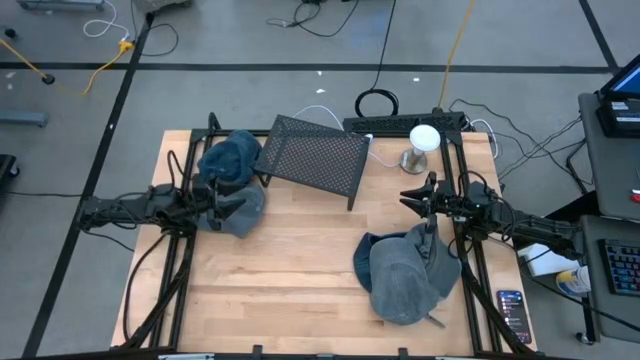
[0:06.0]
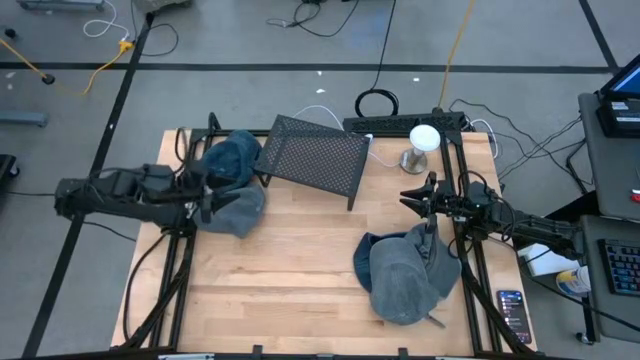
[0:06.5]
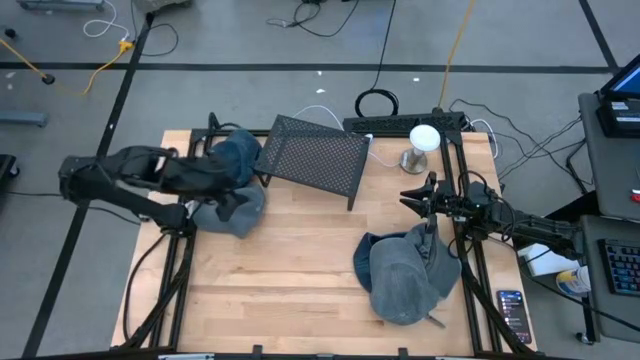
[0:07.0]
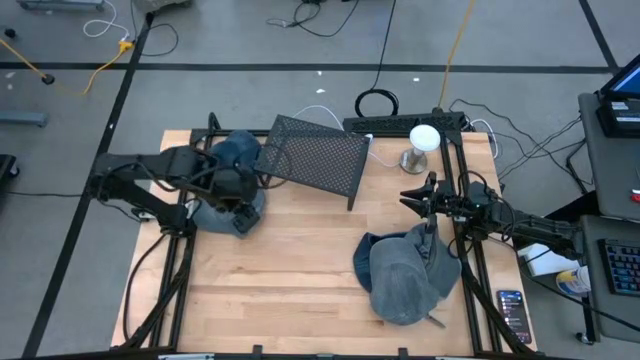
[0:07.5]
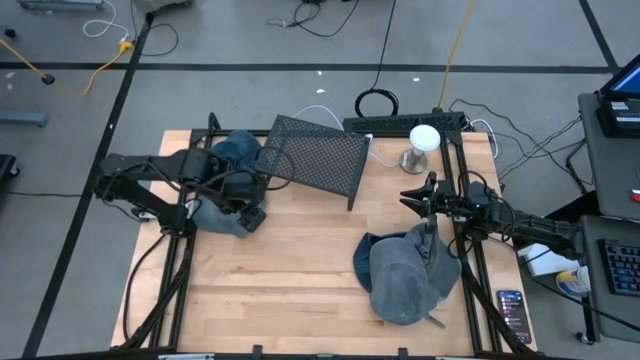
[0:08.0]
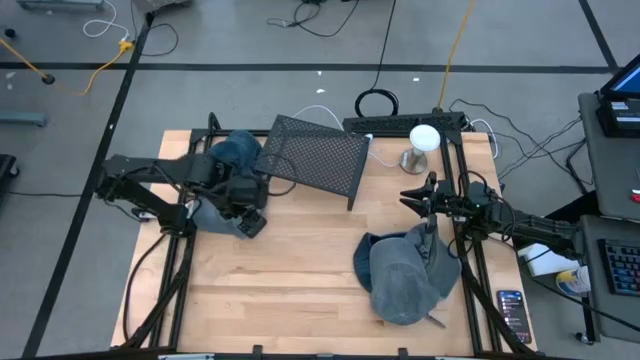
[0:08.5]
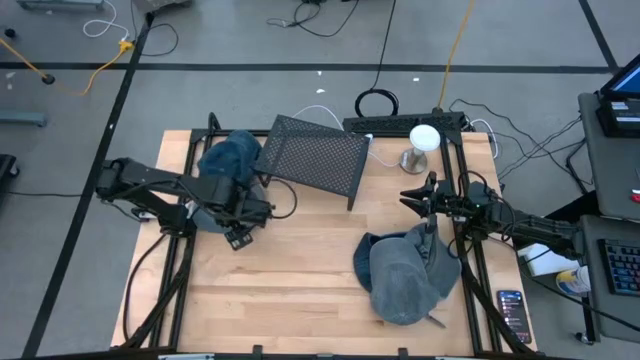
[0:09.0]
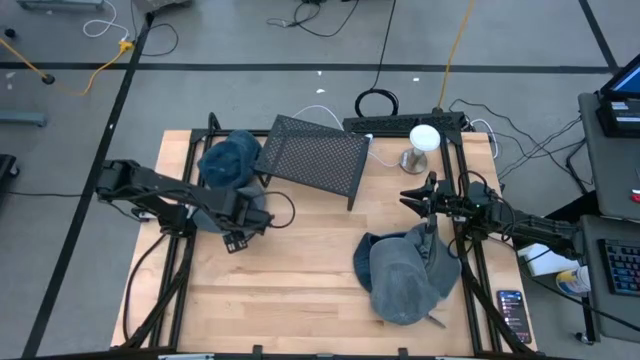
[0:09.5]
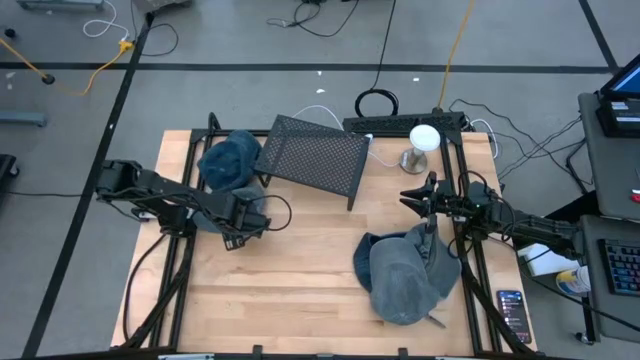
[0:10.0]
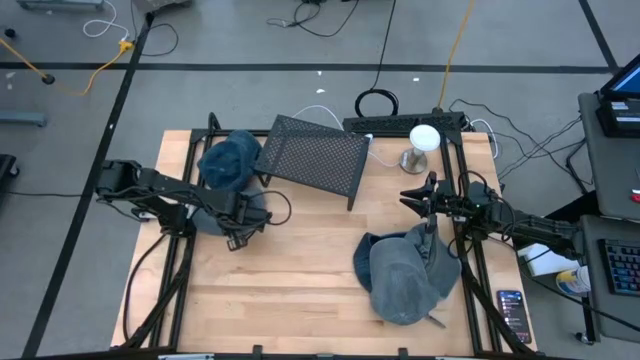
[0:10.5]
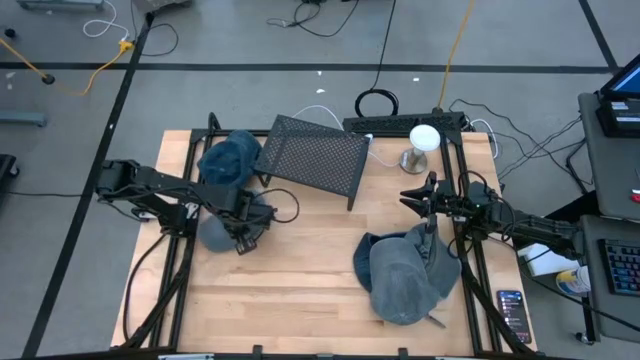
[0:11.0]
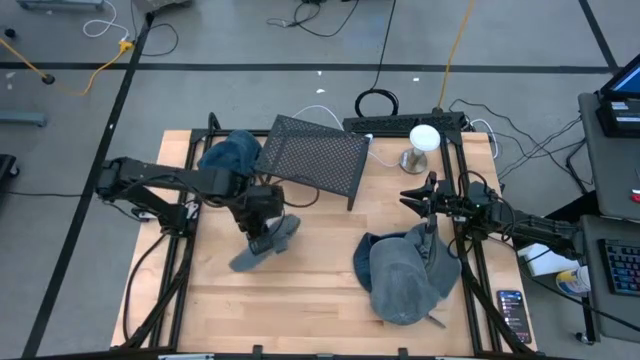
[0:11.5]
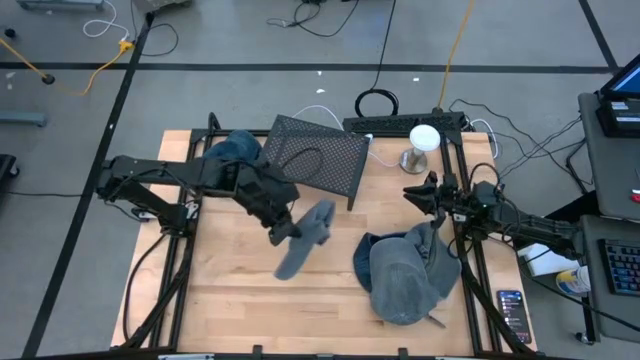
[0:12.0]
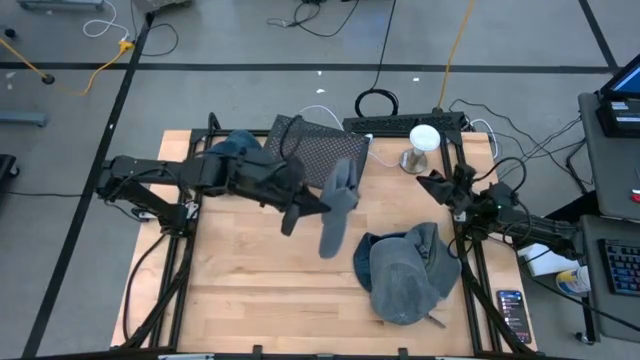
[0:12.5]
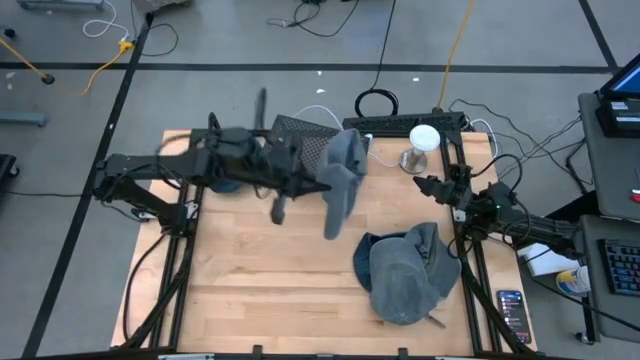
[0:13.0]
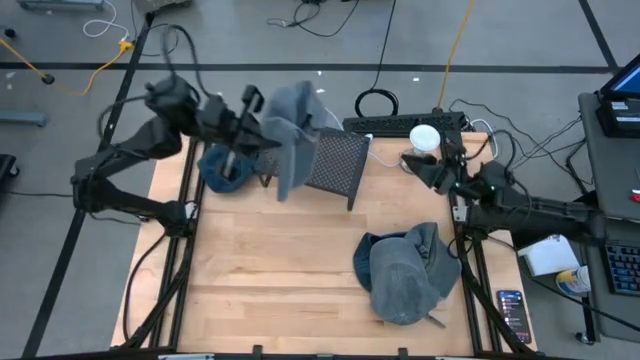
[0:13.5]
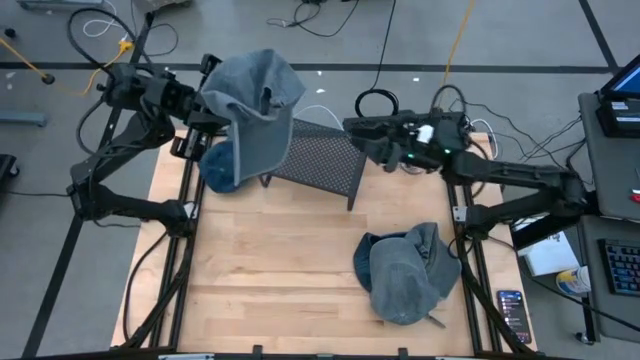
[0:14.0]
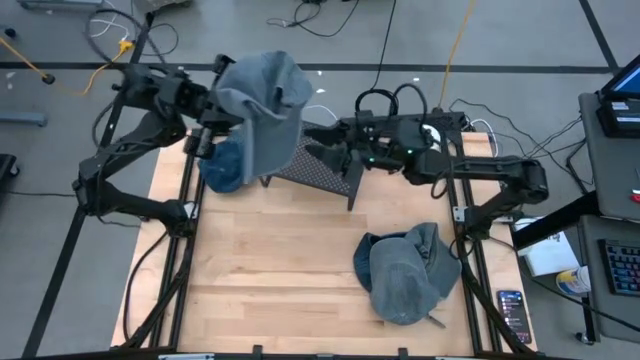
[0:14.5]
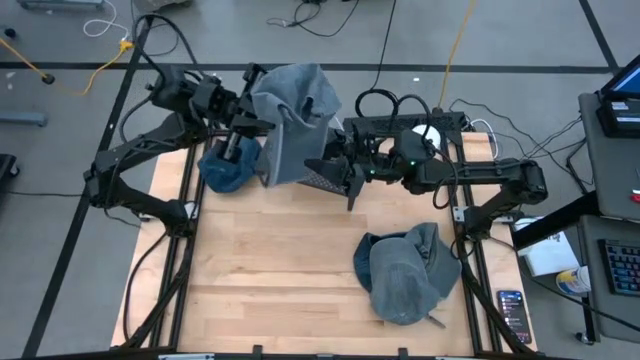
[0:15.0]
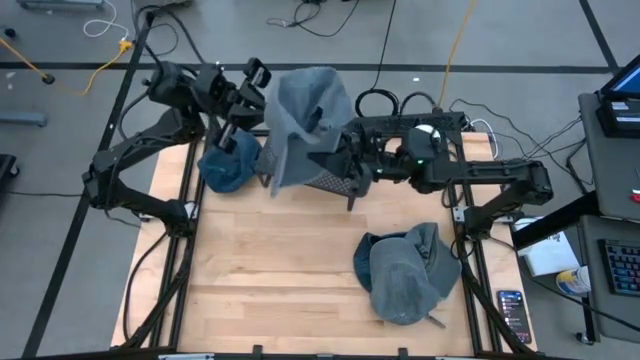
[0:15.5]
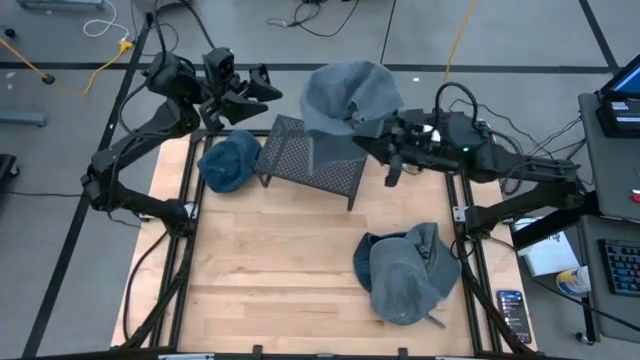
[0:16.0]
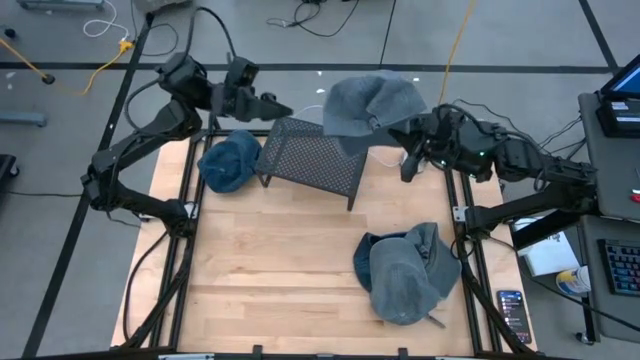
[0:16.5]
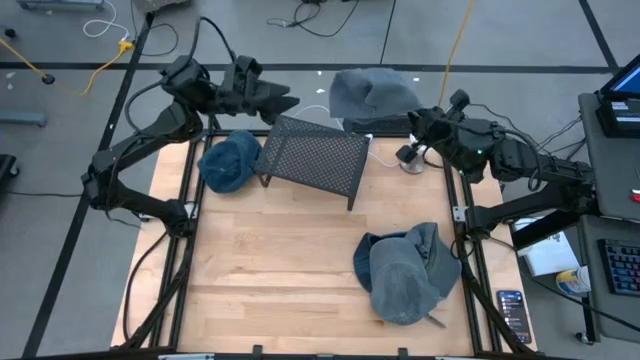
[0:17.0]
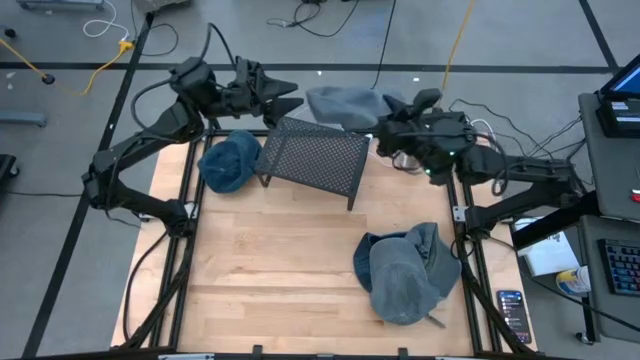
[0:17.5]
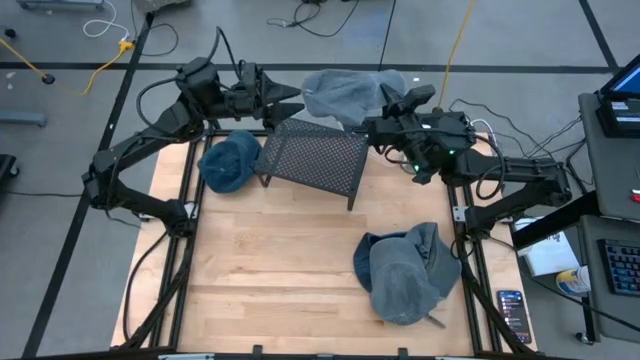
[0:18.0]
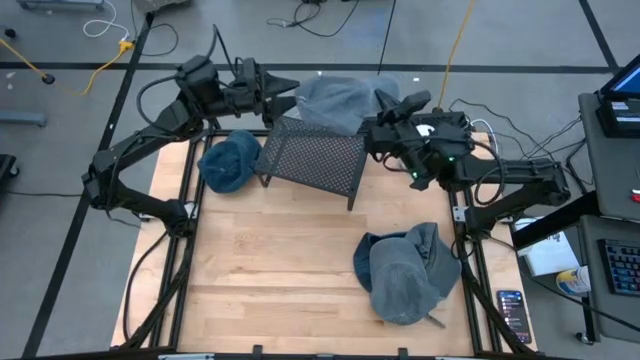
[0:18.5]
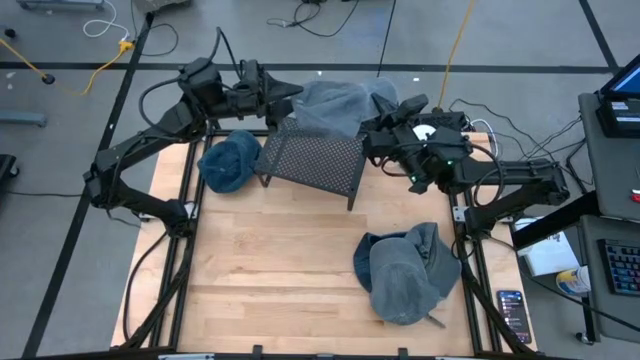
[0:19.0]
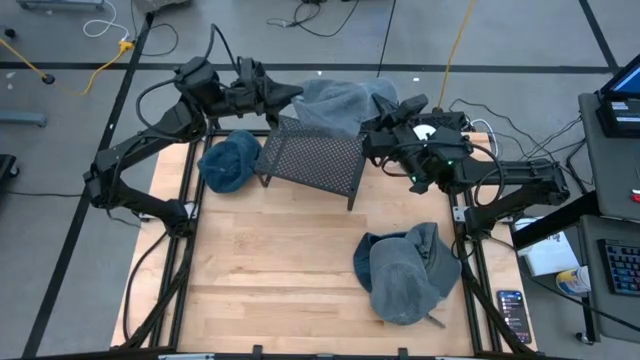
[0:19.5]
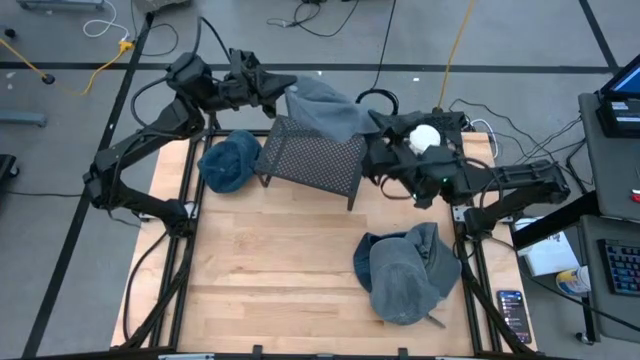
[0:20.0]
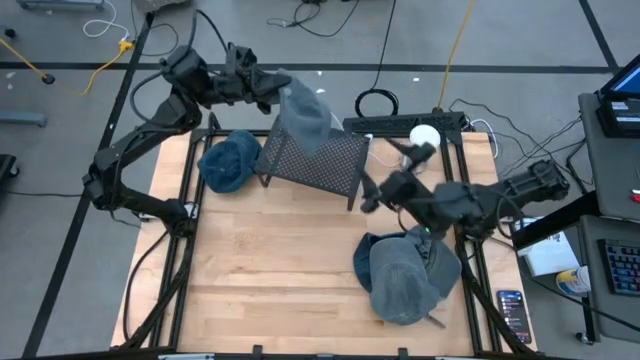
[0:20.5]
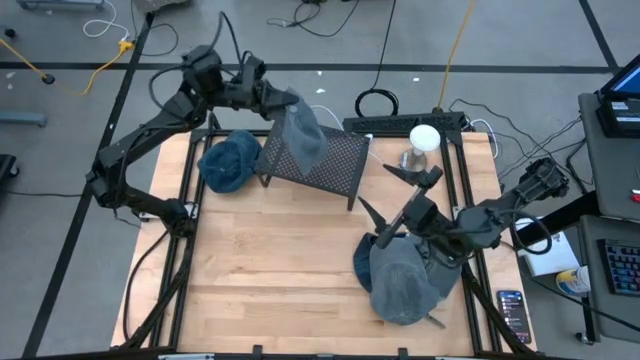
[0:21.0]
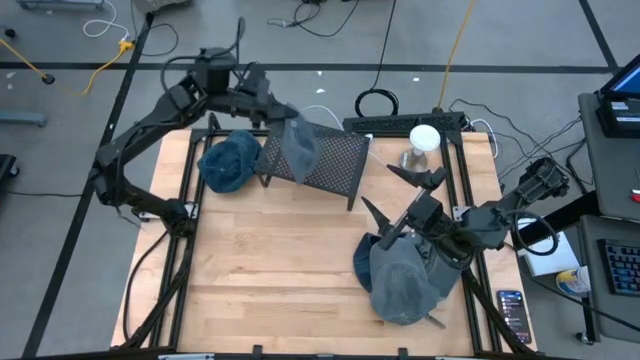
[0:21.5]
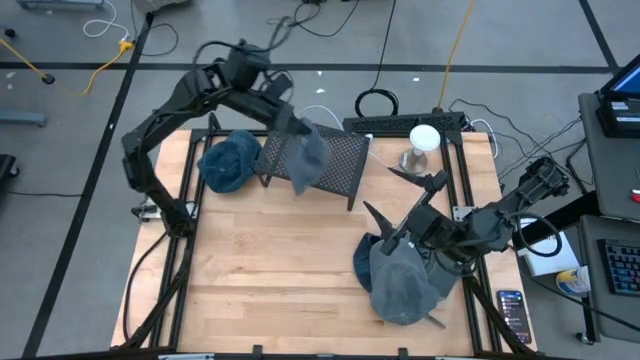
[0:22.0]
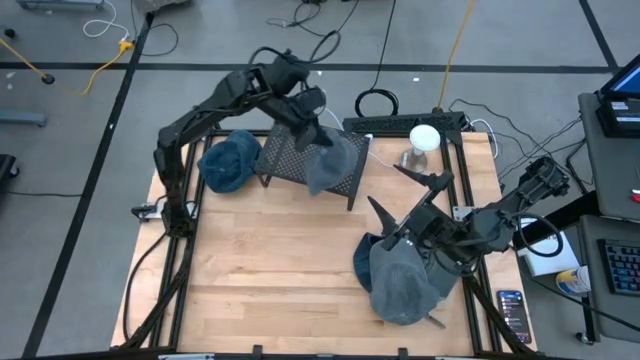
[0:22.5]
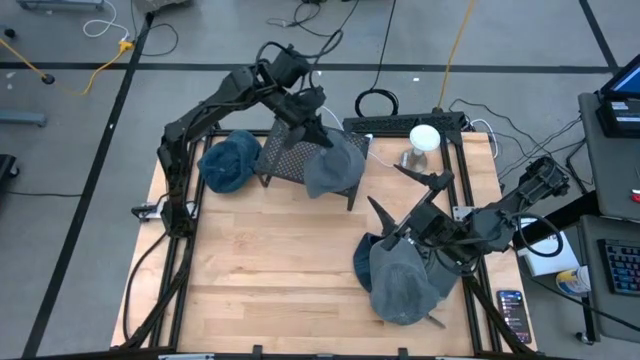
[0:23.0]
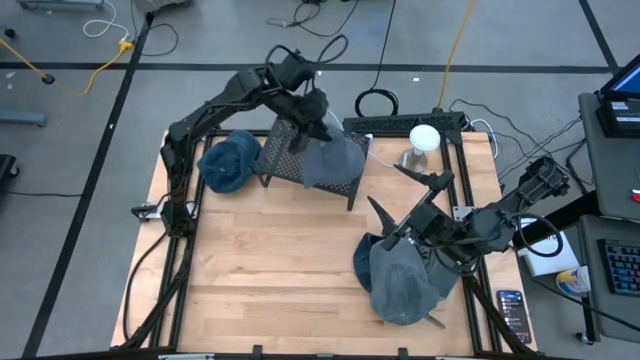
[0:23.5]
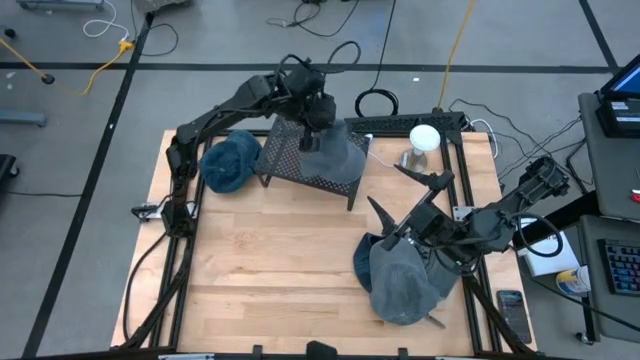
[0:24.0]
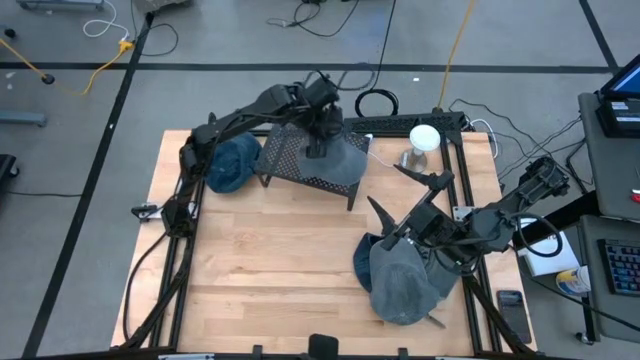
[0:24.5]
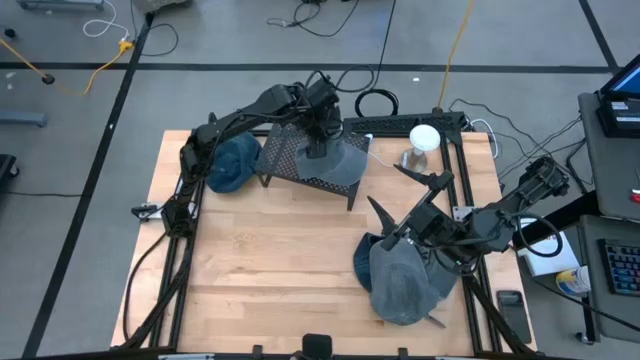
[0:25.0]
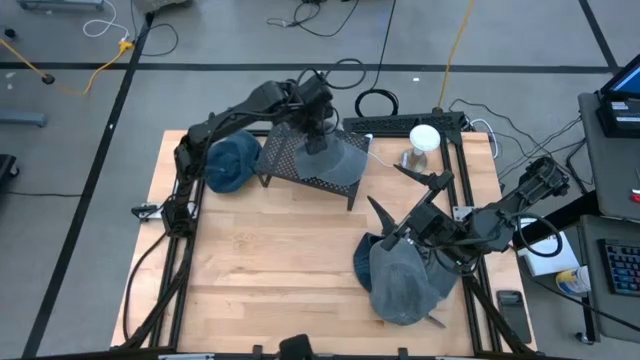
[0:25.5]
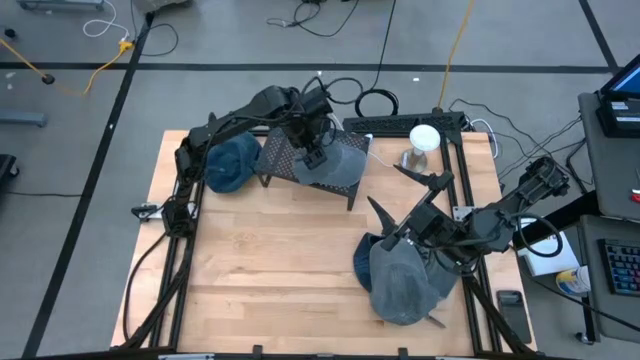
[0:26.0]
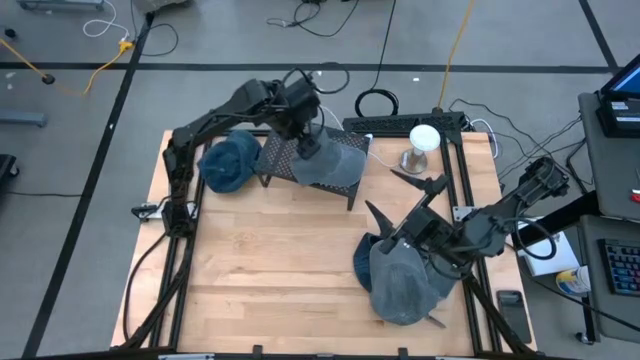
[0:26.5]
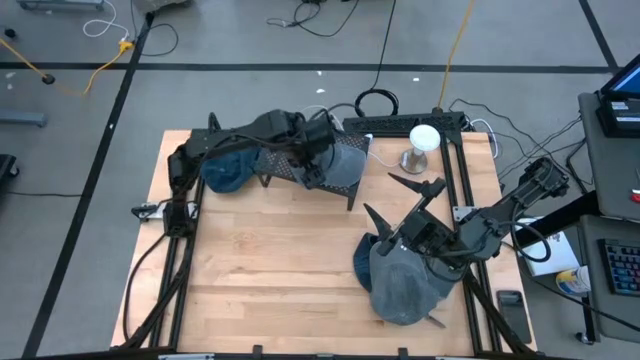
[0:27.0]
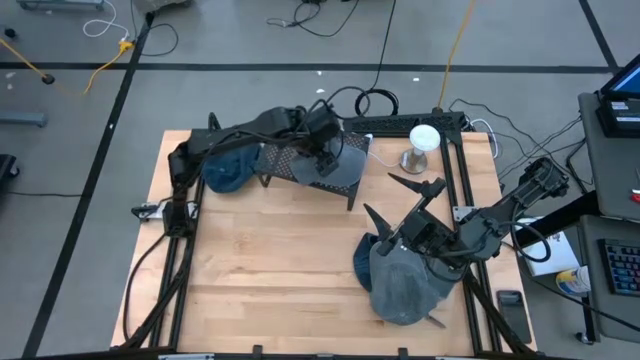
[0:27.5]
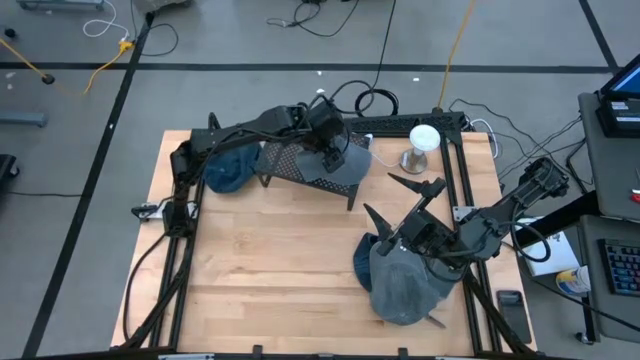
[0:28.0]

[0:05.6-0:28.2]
Task: Pick & Place hat
Put the left gray cap on the shelf
